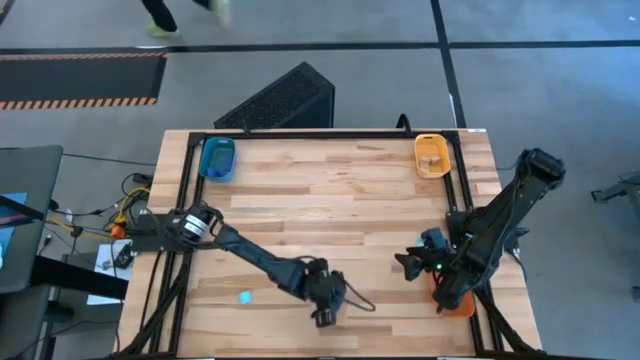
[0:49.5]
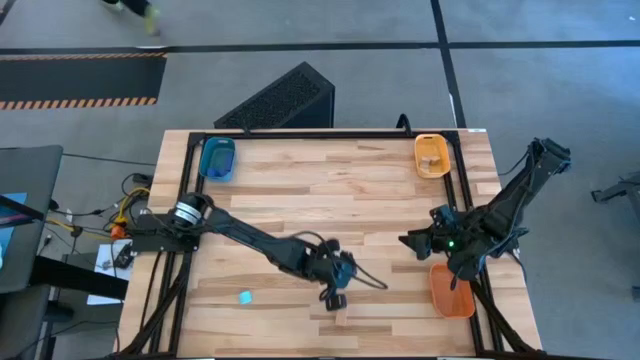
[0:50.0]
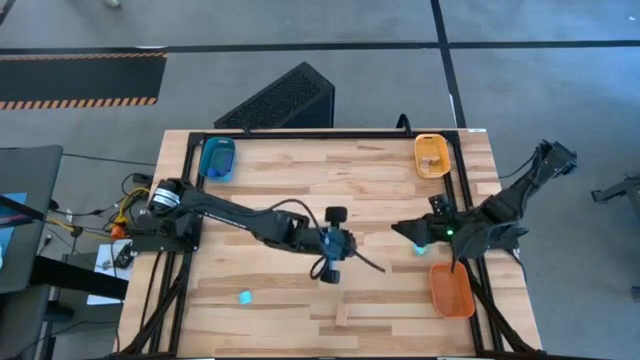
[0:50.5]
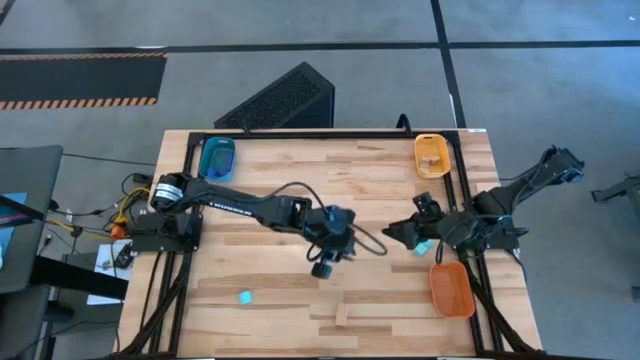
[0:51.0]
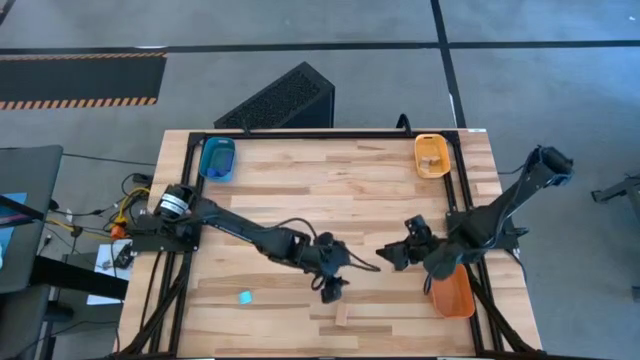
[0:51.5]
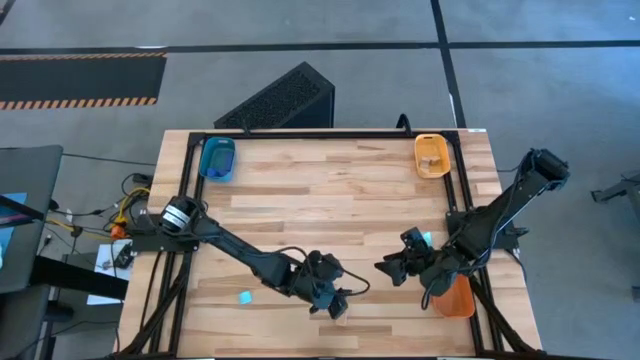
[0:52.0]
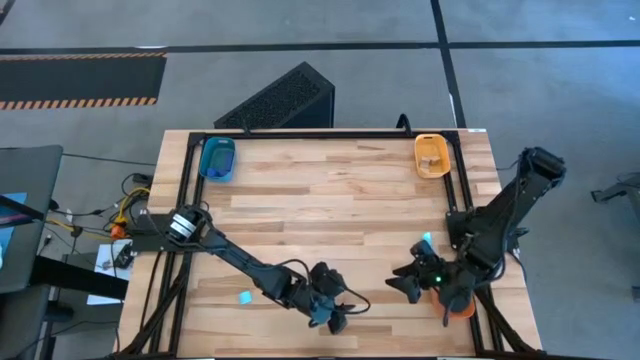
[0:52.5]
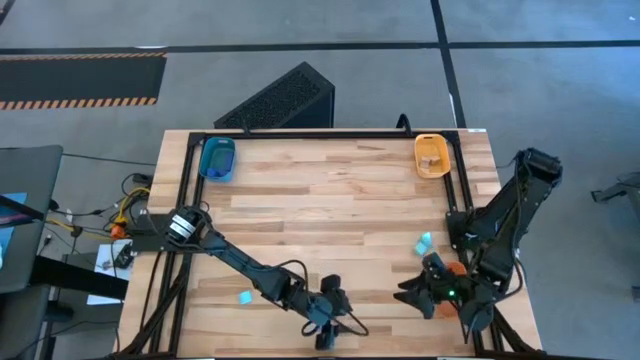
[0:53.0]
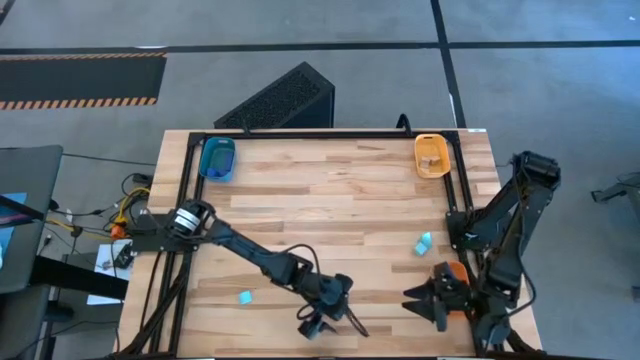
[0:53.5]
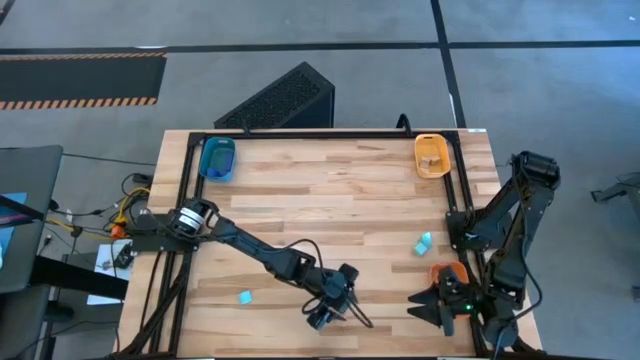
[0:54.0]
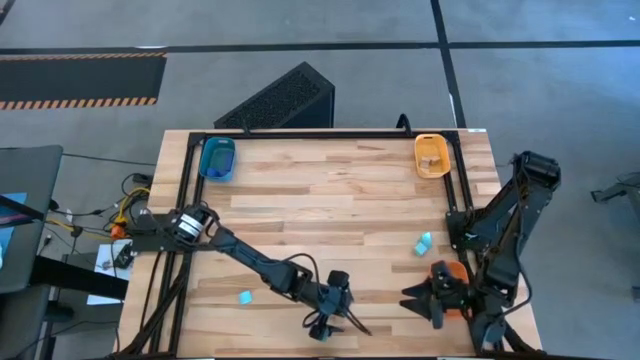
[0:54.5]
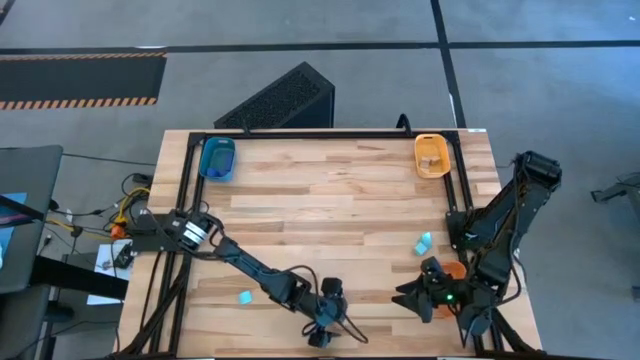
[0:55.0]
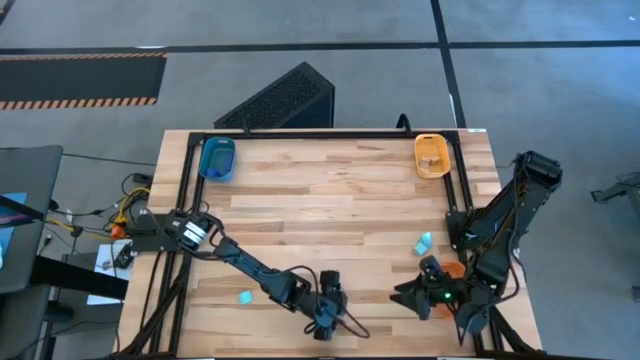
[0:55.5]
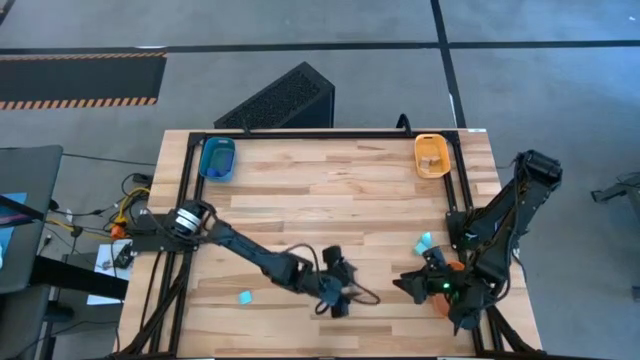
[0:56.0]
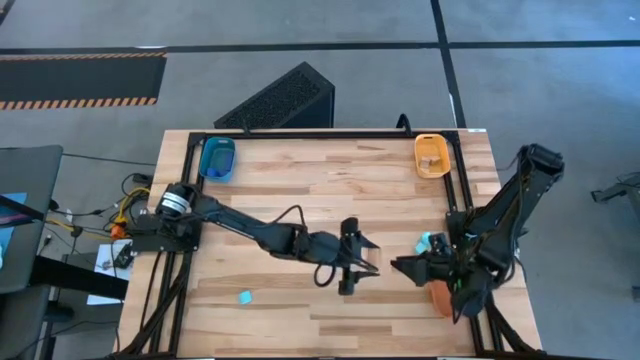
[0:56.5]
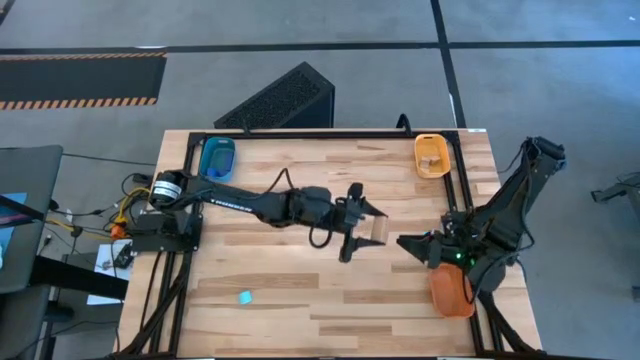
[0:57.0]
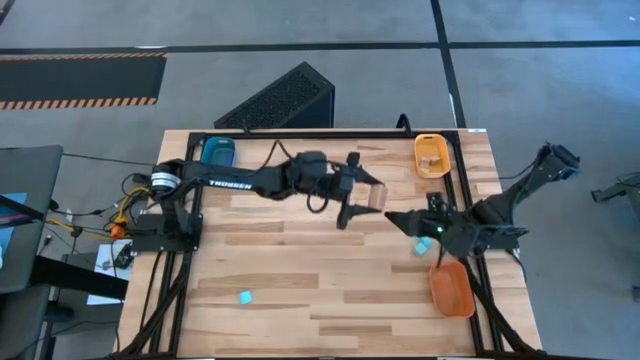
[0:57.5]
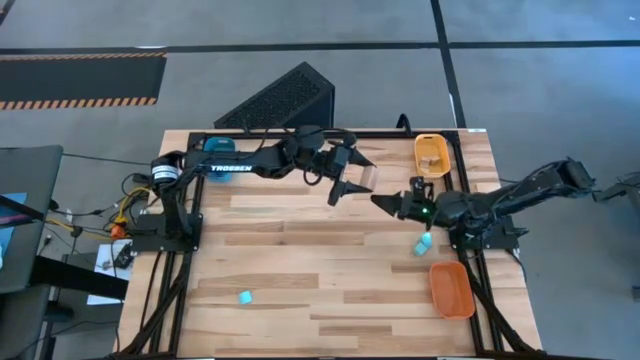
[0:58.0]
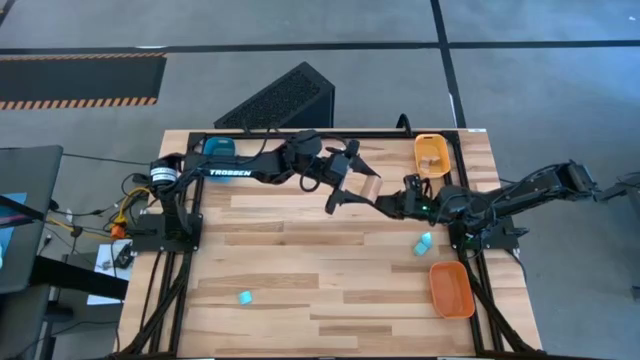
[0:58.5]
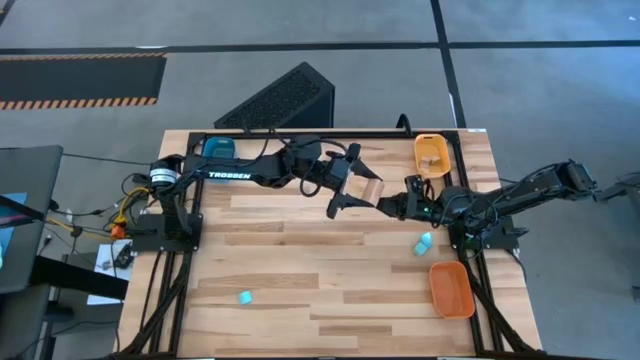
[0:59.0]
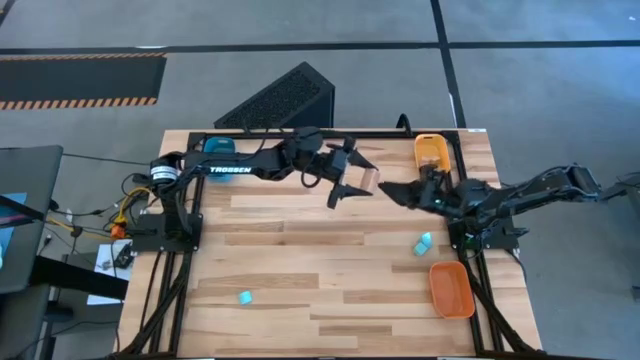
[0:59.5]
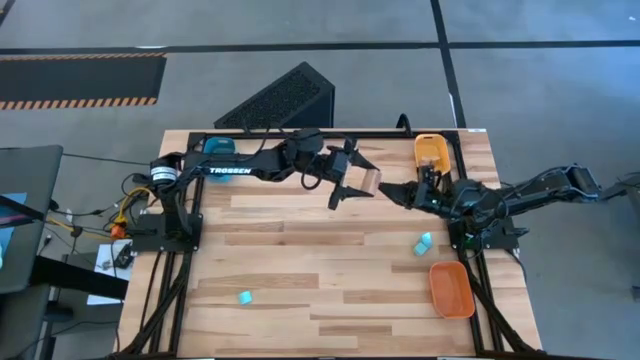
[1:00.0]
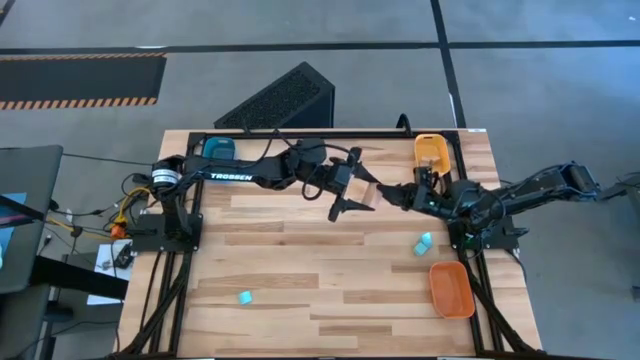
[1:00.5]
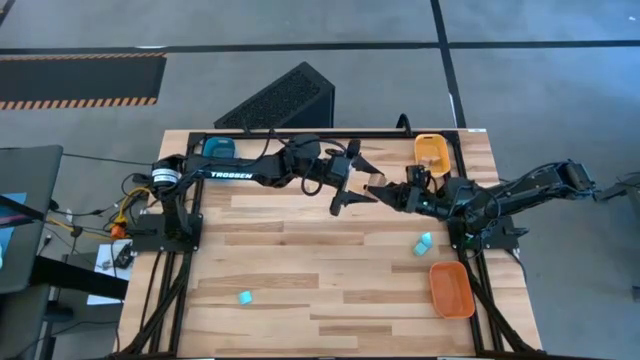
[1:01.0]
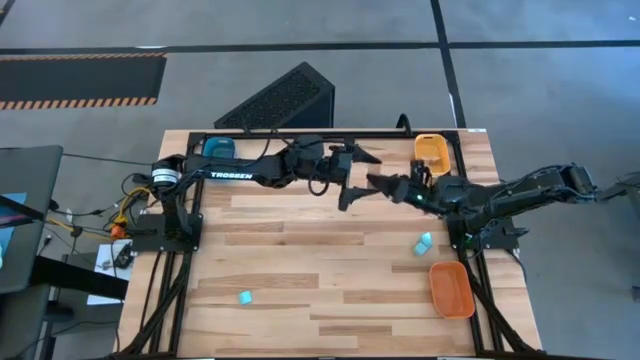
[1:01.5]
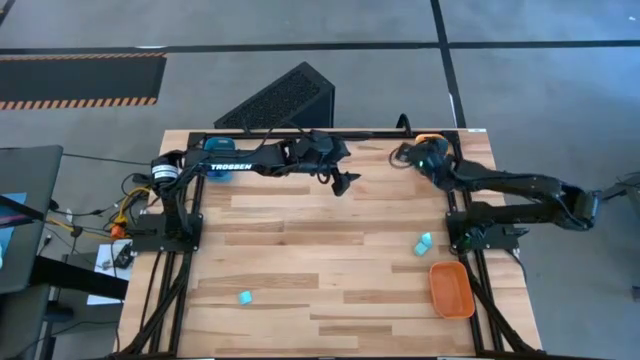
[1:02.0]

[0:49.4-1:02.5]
Task: Sort & place blocks by color
Put the brown block into the yellow bin

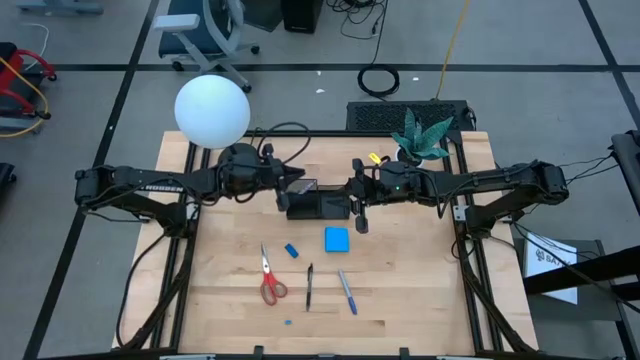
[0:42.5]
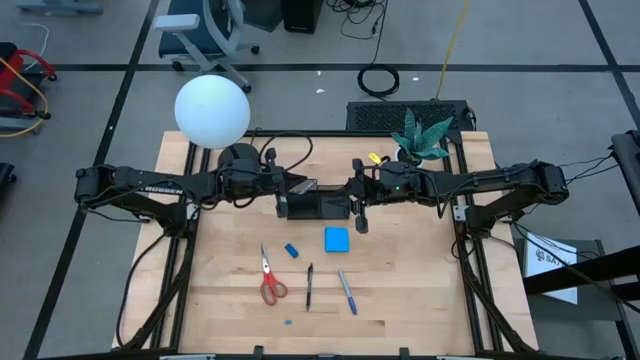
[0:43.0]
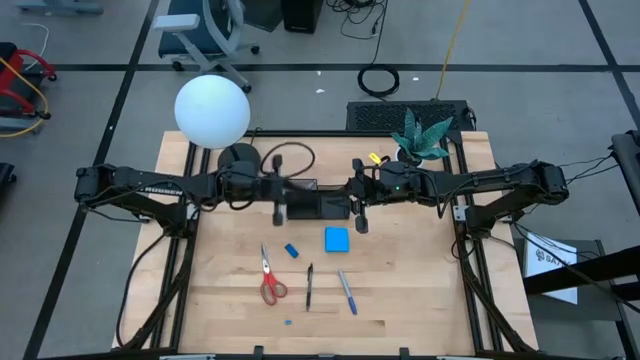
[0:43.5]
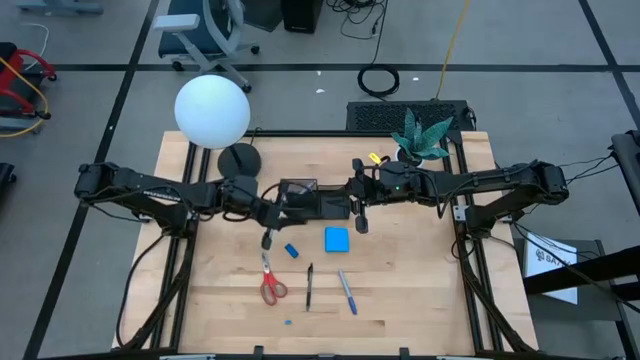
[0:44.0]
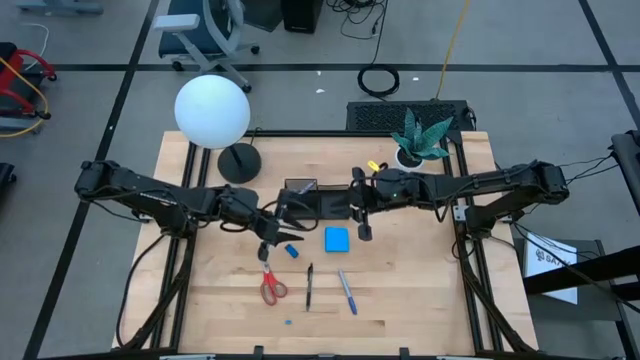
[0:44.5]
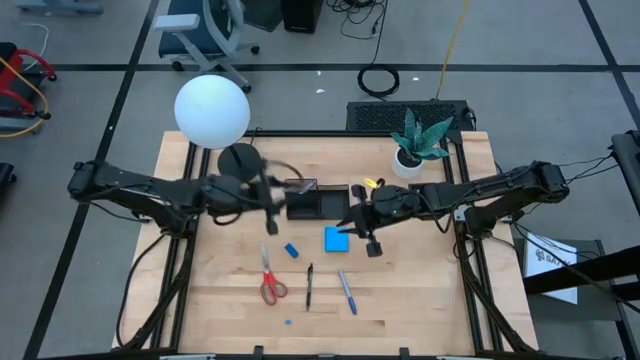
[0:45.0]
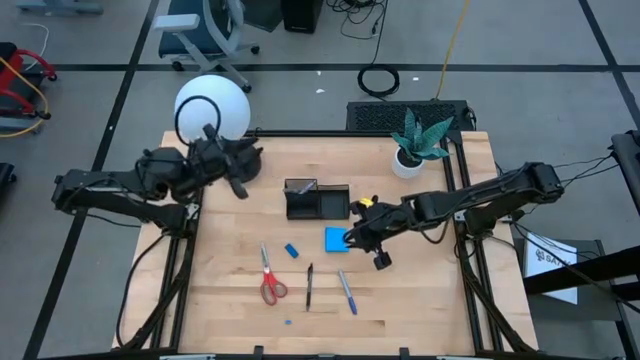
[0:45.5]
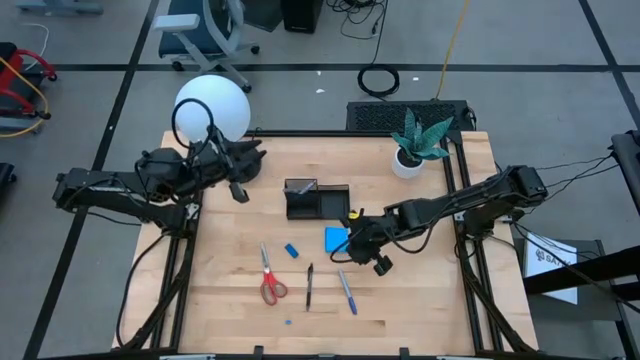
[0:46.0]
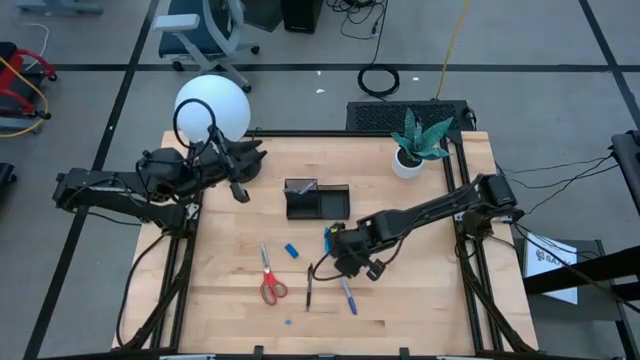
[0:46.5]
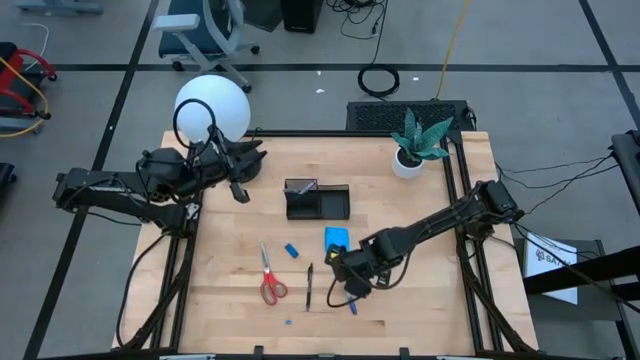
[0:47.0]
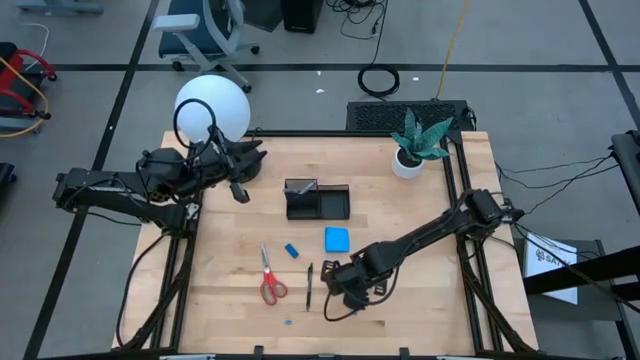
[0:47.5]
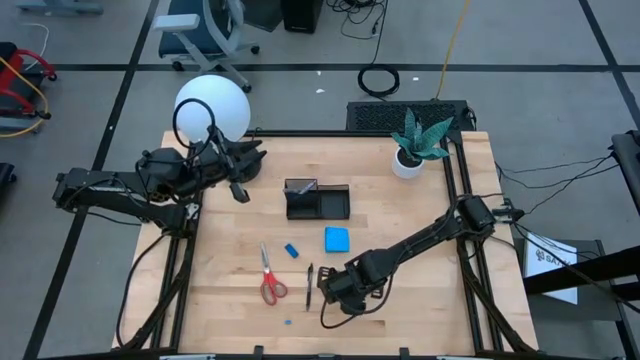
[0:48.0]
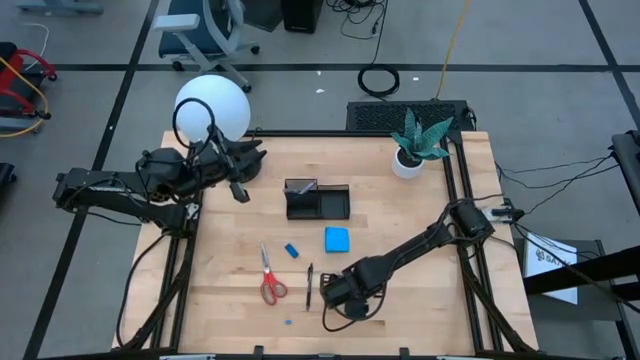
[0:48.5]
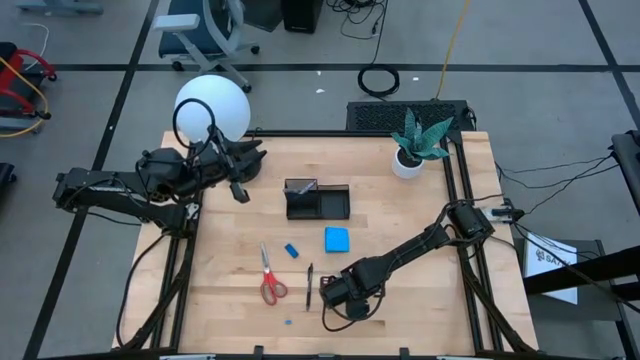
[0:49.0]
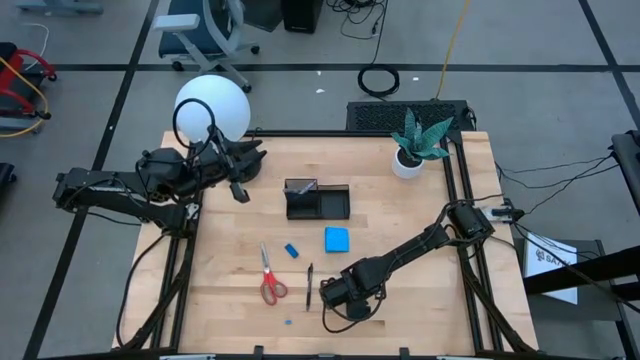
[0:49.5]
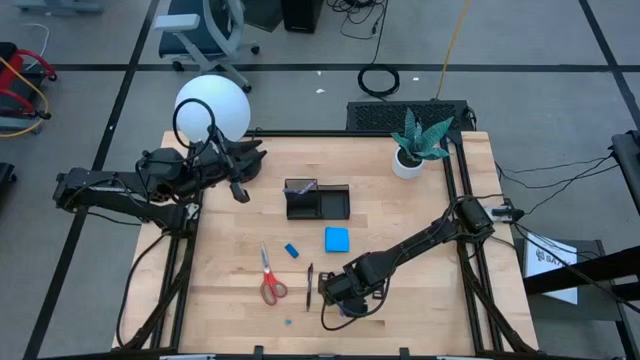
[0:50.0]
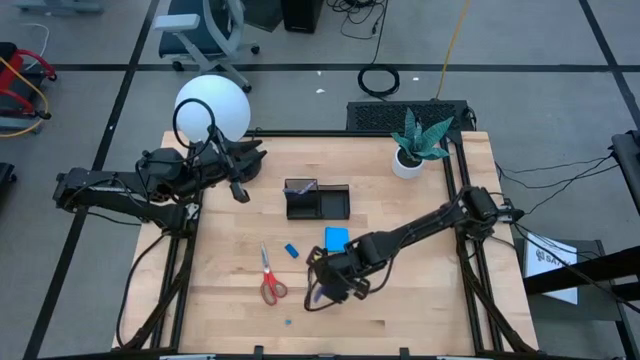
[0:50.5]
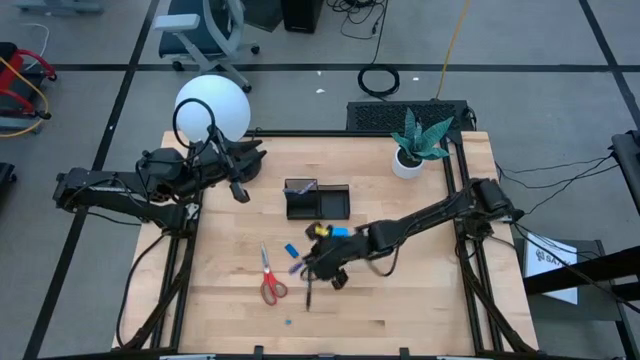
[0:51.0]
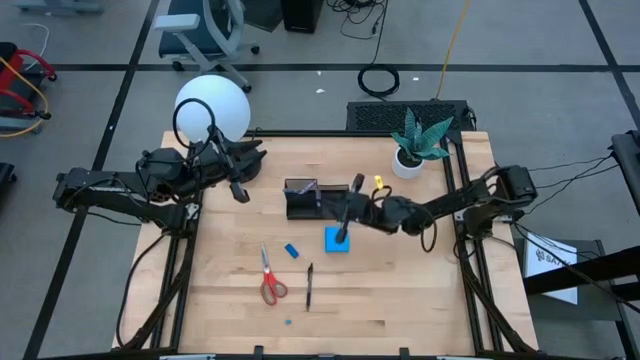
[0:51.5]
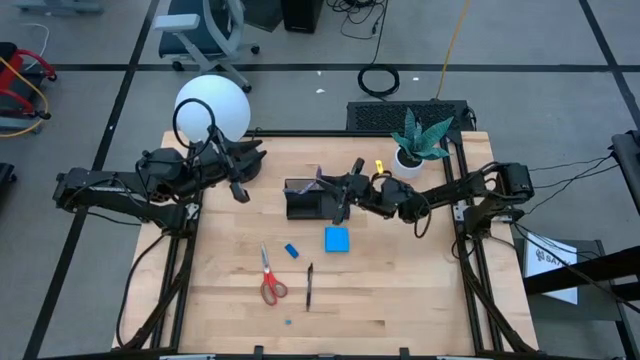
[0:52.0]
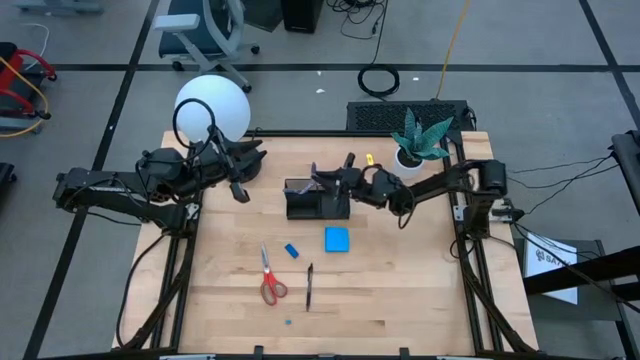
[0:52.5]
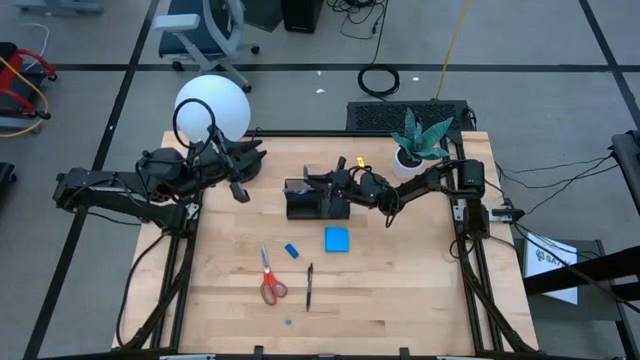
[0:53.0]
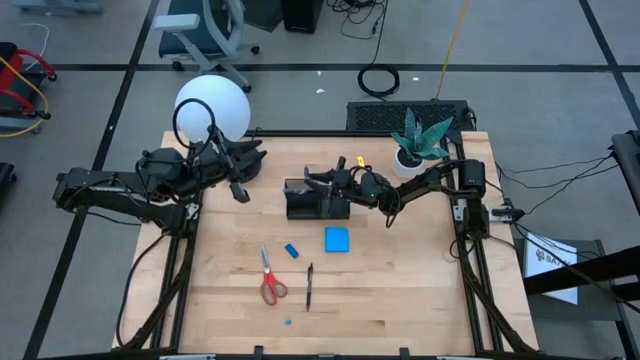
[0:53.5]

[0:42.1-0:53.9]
Task: Pick and place office supplies into organizer
Put the blue marker into the black mesh organizer
